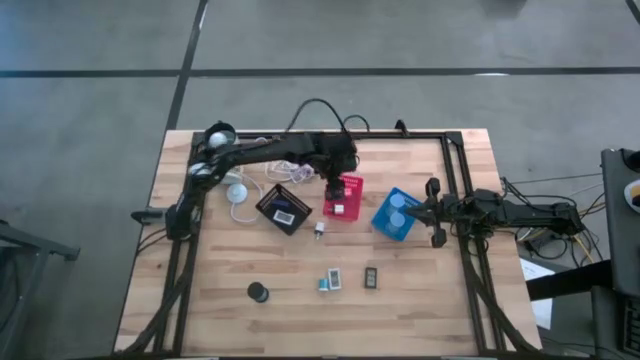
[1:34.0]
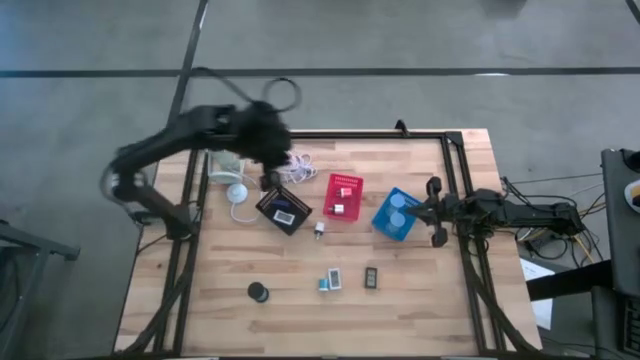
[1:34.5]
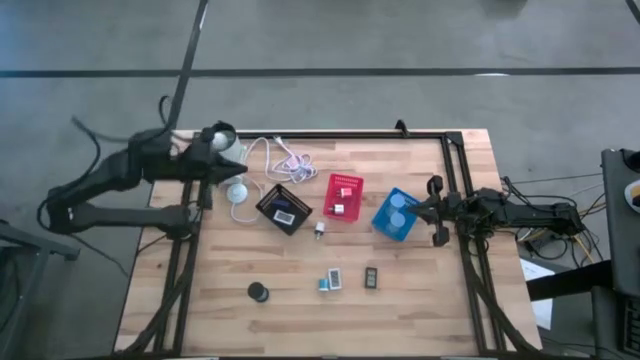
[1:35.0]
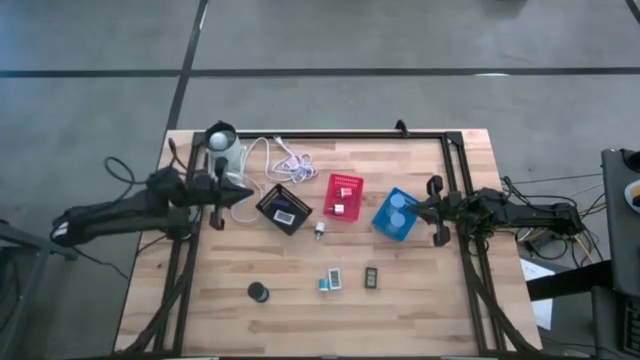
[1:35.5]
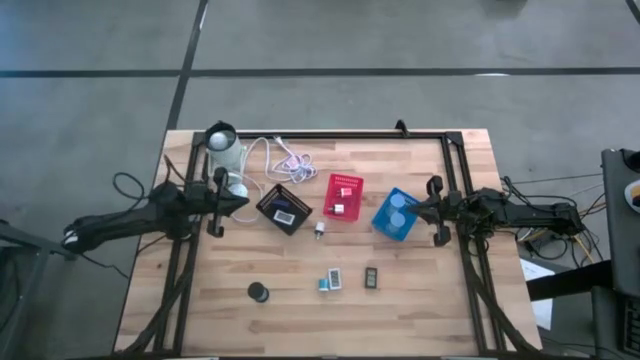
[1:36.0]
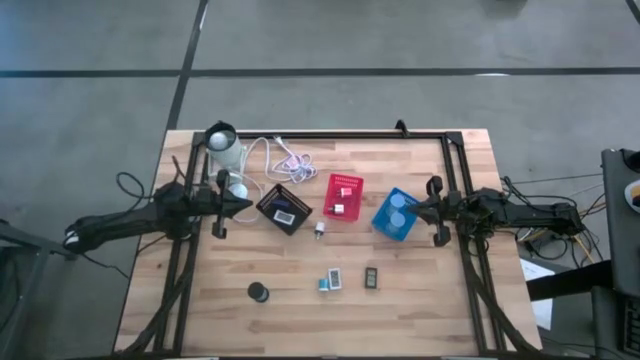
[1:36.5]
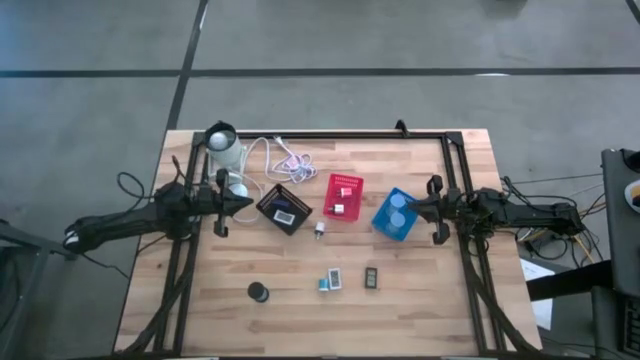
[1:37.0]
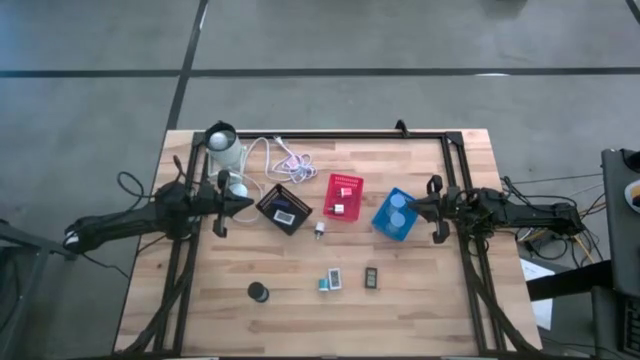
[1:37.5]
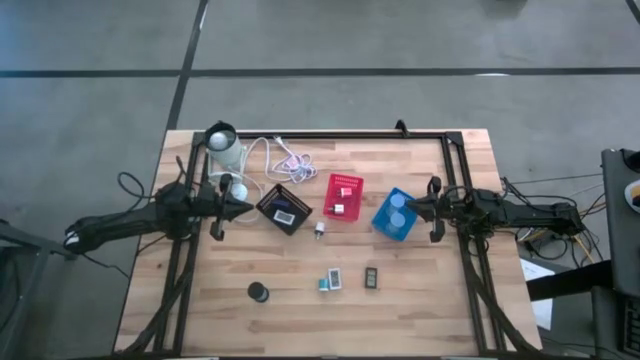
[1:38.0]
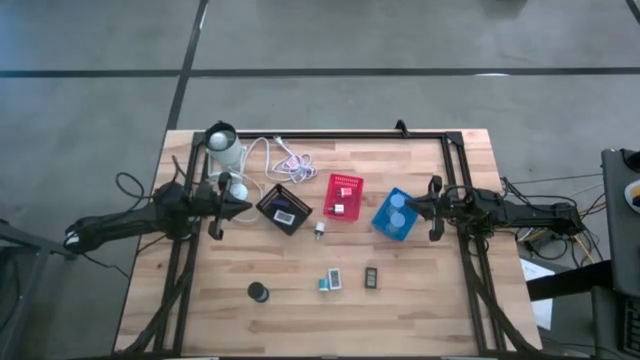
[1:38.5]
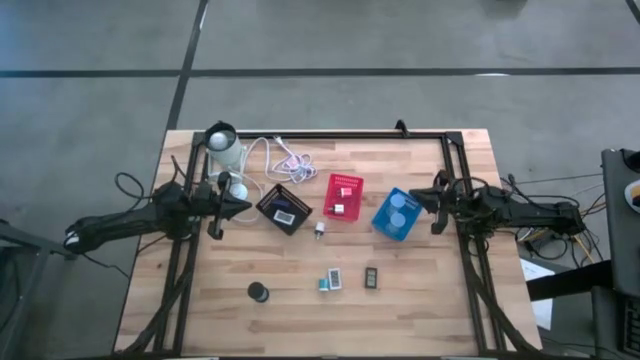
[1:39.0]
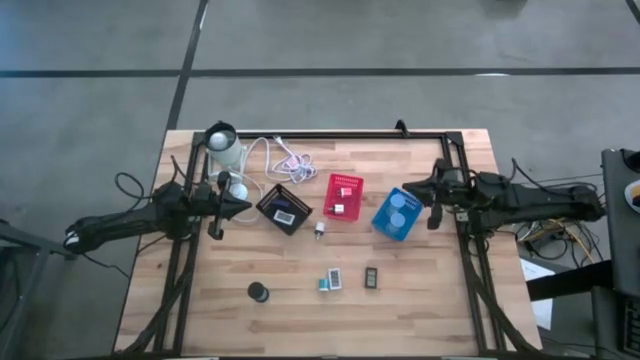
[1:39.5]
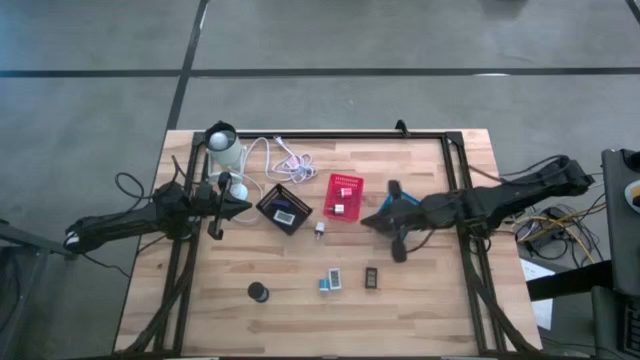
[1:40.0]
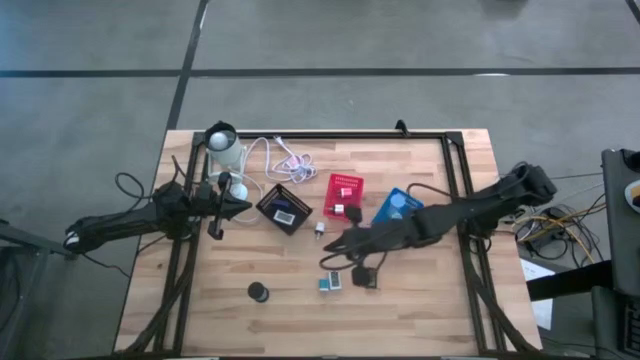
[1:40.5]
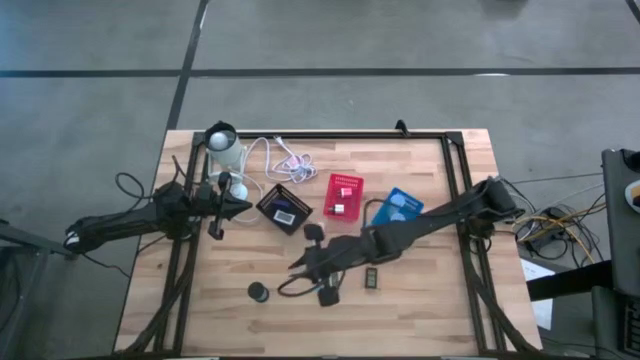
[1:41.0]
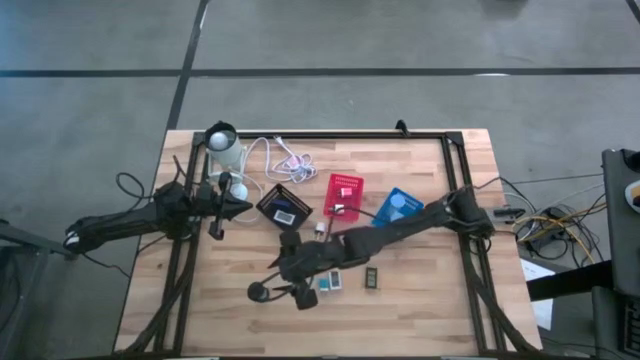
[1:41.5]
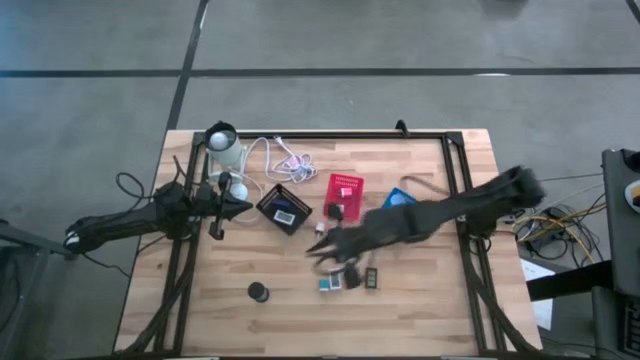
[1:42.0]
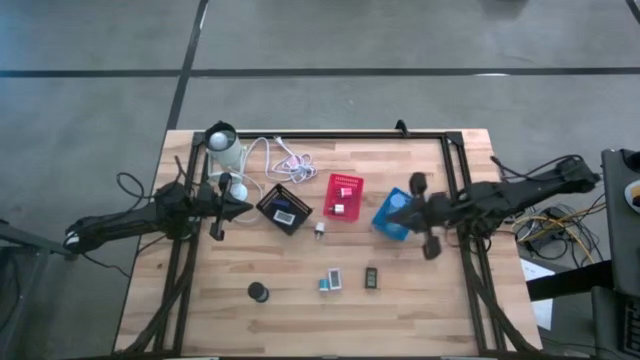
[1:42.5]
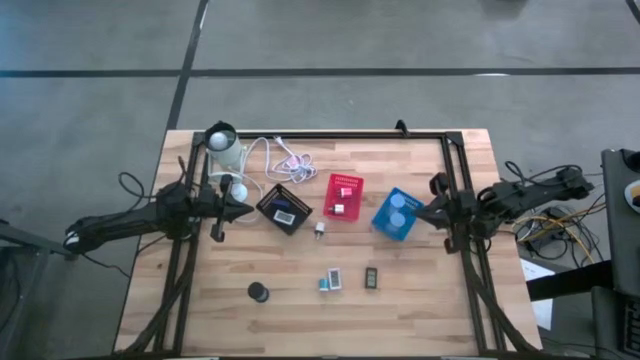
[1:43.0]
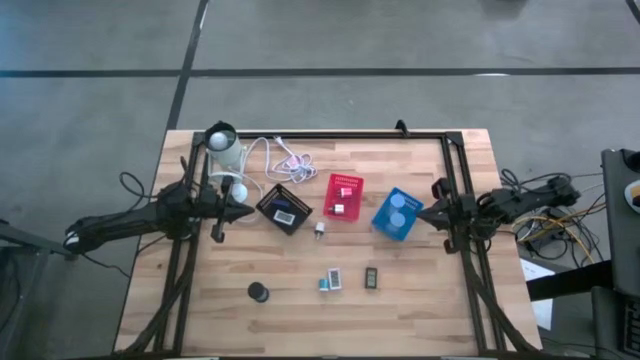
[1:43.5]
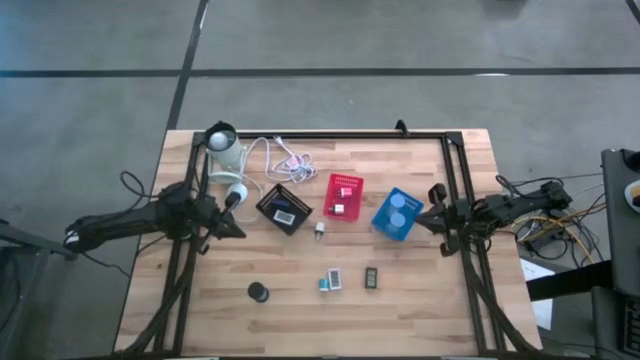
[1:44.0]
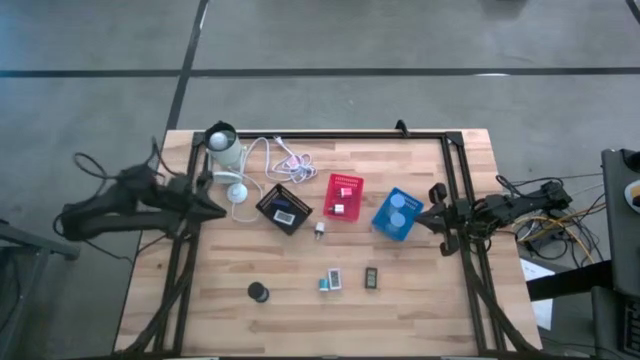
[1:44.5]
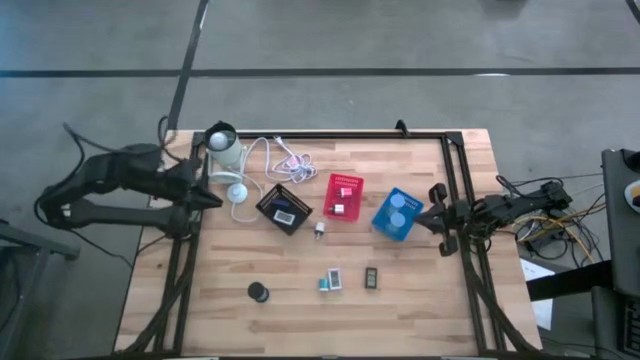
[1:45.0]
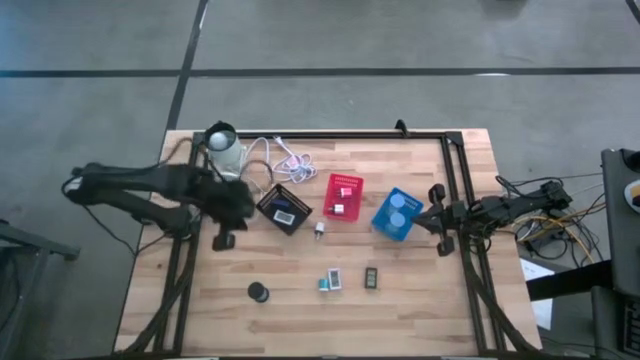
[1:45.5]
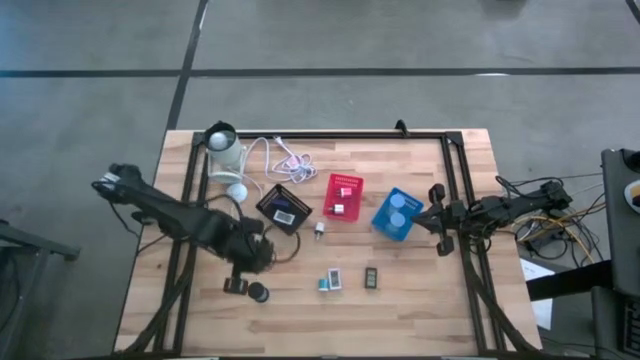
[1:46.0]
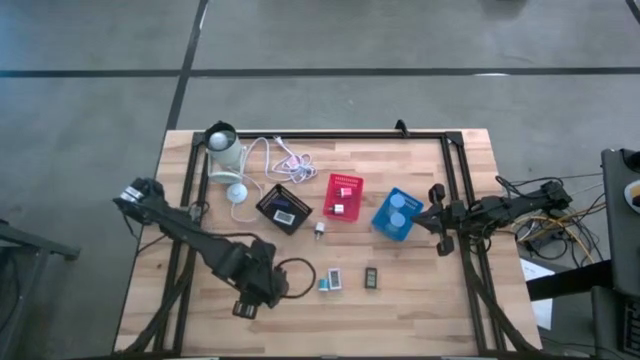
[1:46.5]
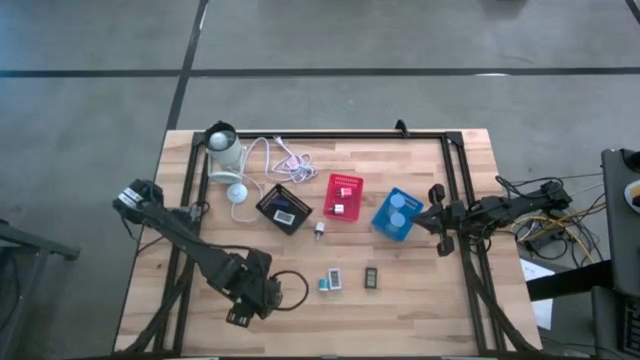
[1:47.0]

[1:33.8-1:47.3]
Task: Pick & Place Office items
Put the black hourglass into the blue basket

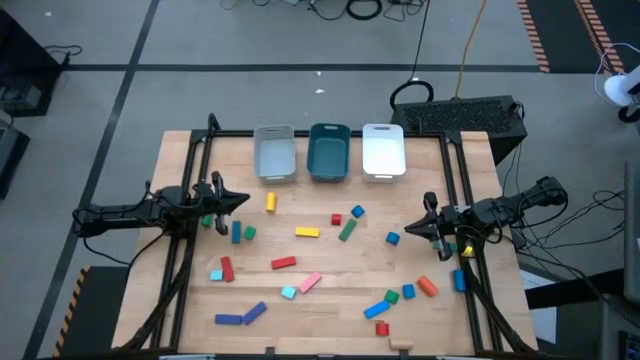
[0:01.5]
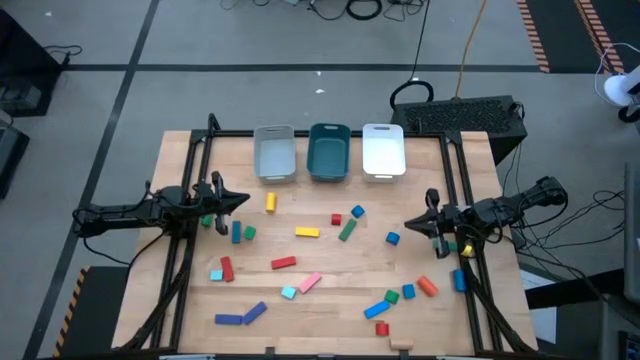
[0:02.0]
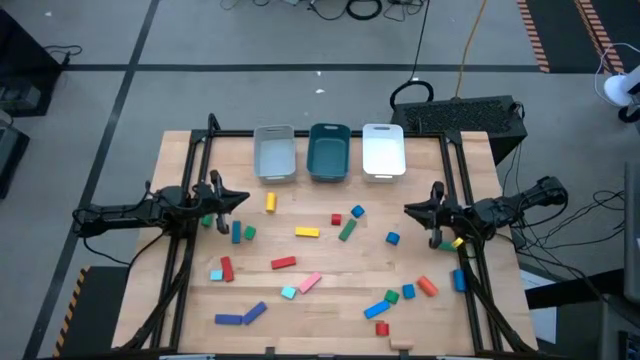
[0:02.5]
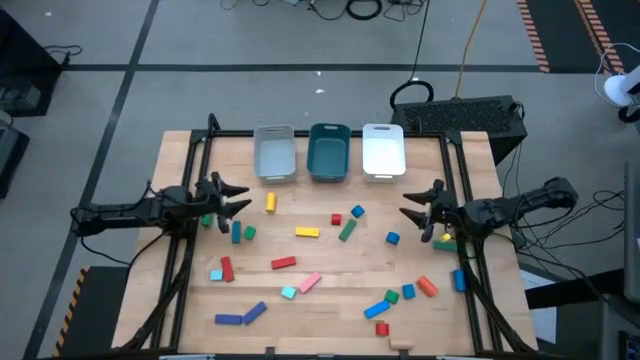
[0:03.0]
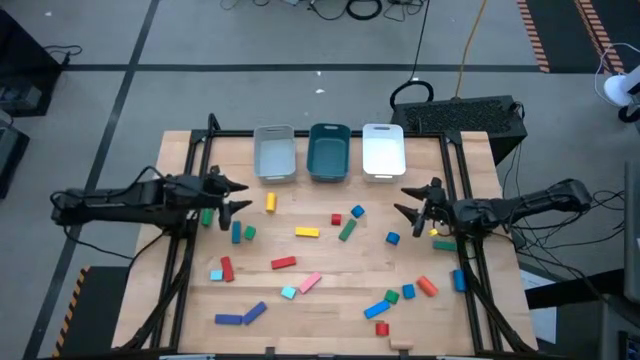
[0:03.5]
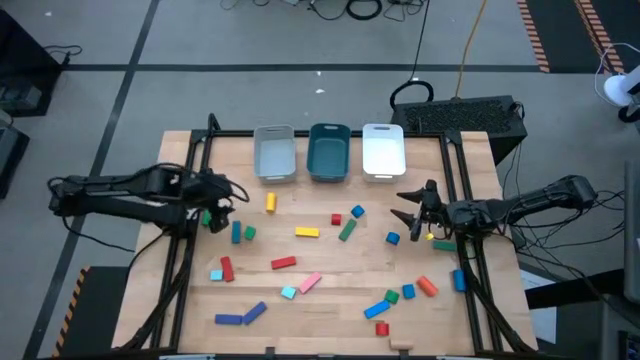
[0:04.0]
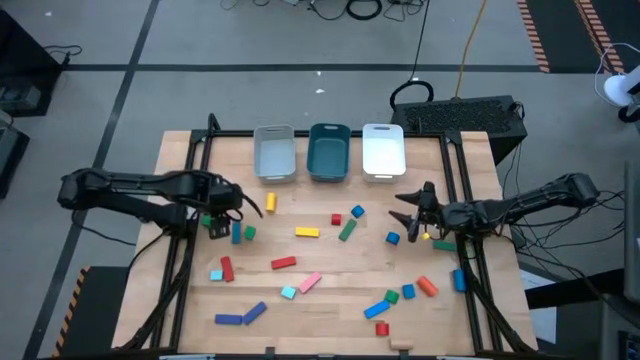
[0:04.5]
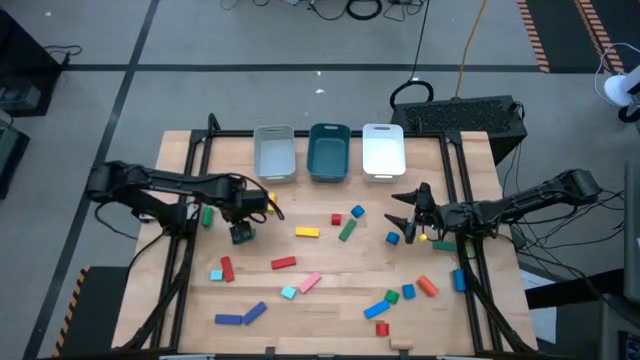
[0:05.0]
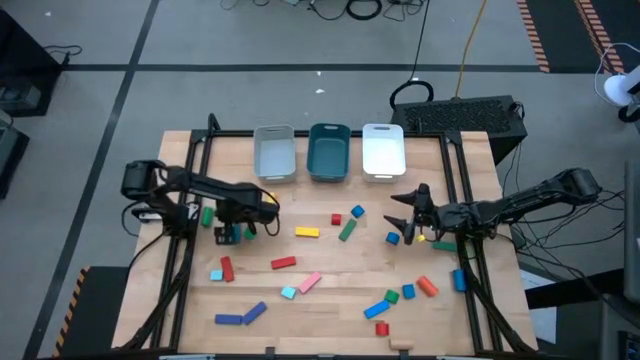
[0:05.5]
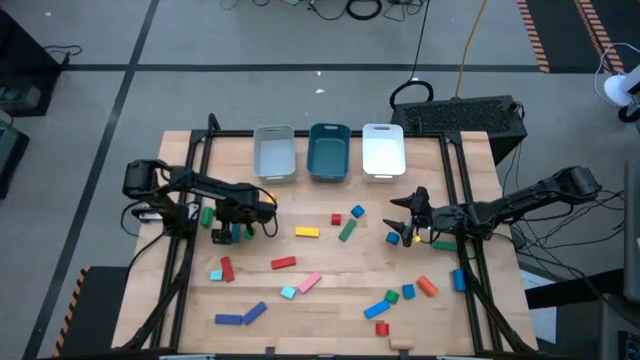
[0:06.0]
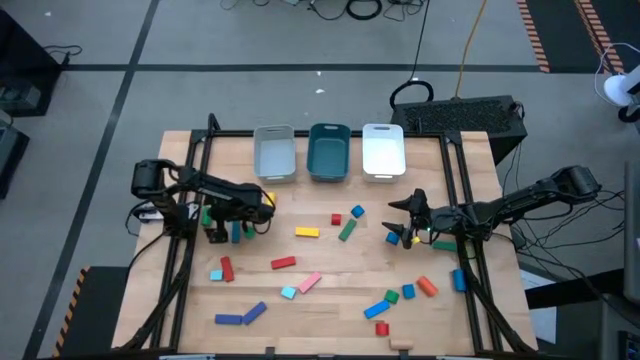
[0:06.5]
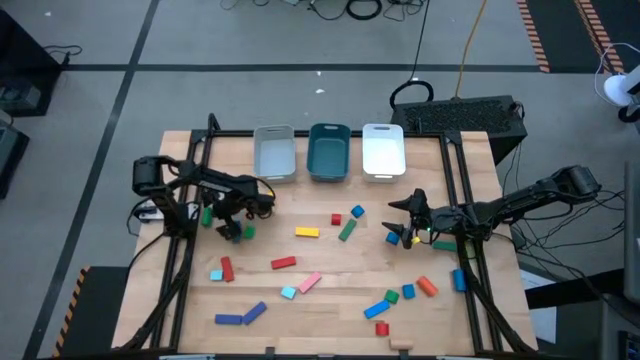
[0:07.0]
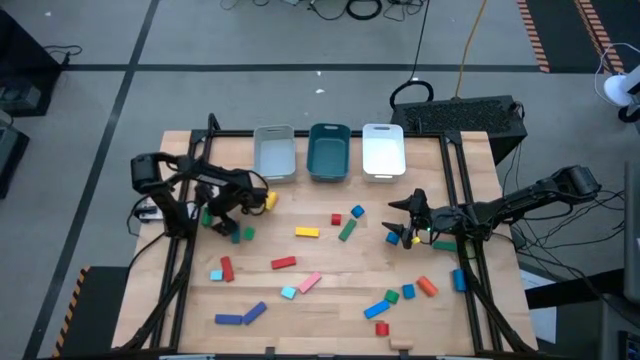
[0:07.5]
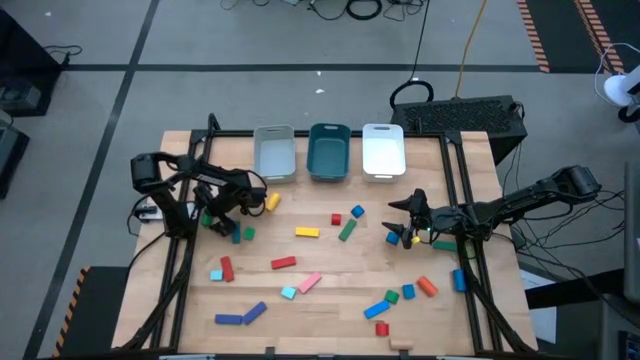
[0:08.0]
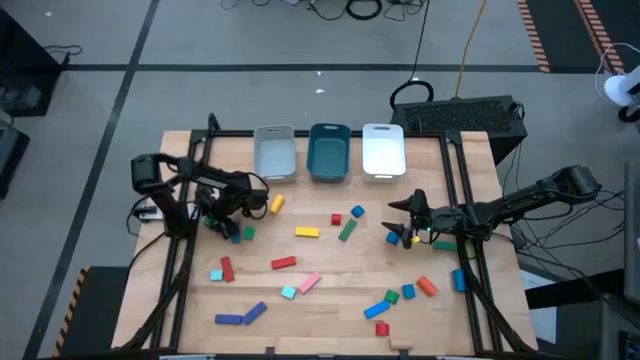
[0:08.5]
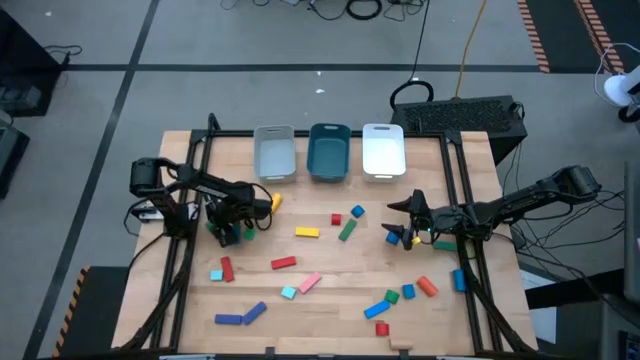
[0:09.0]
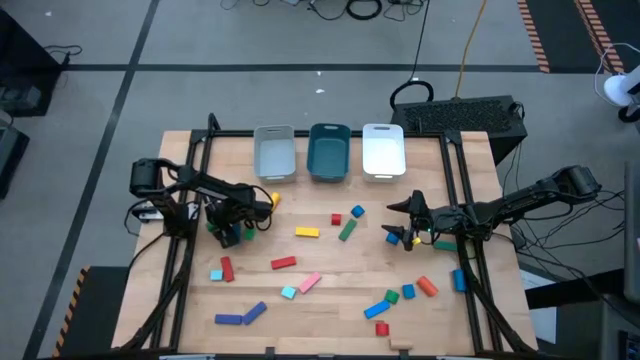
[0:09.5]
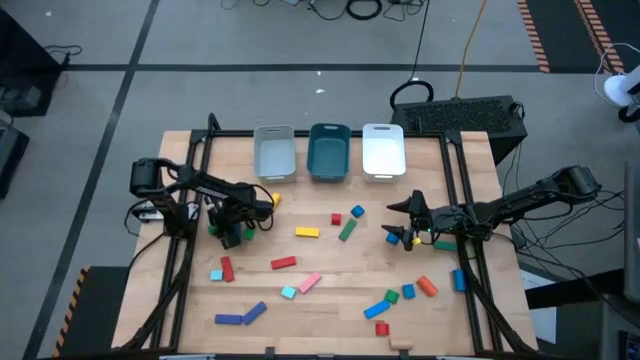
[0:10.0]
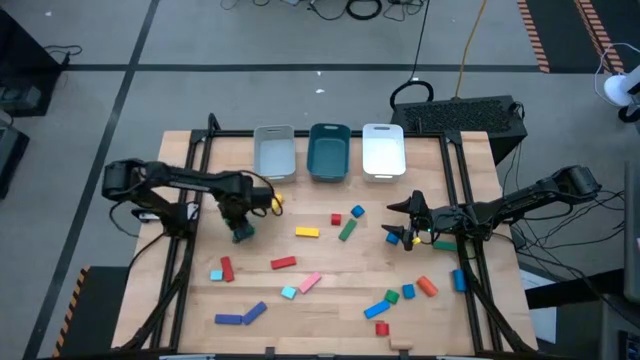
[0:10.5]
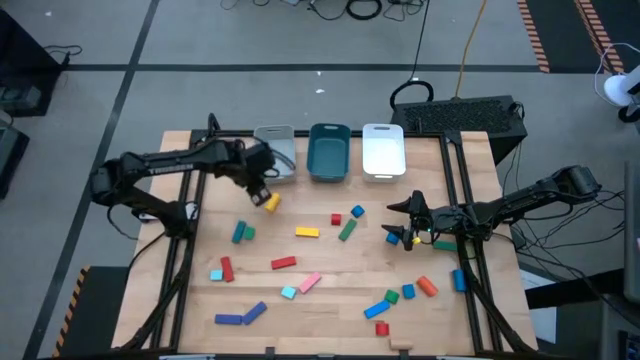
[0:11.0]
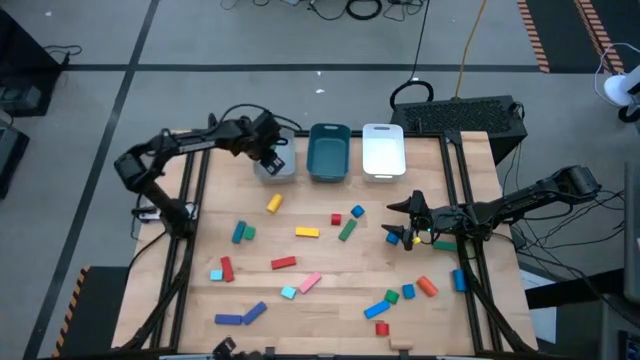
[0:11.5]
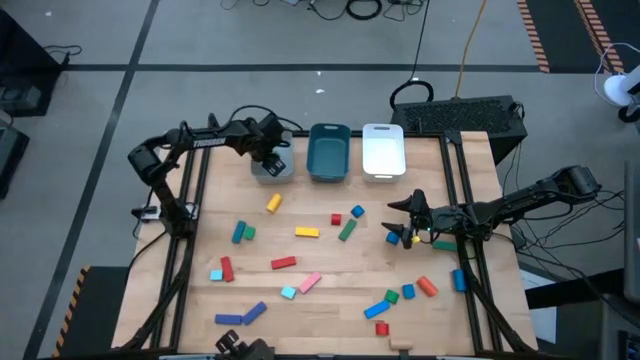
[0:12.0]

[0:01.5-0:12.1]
Task: Sort blocks by size
Put the green cylinder block into the gray bin
